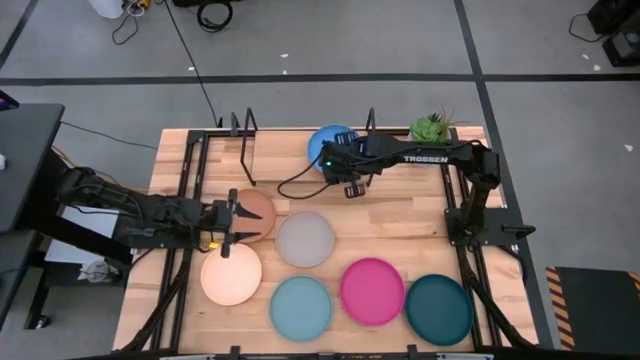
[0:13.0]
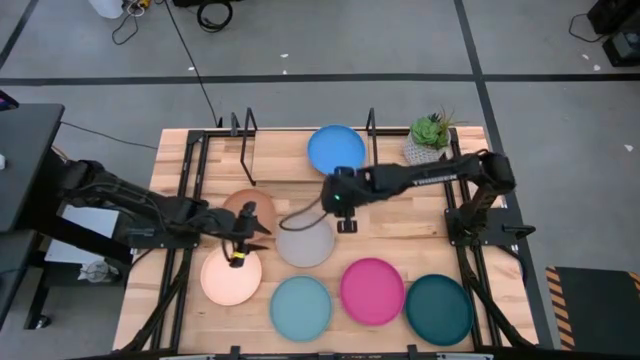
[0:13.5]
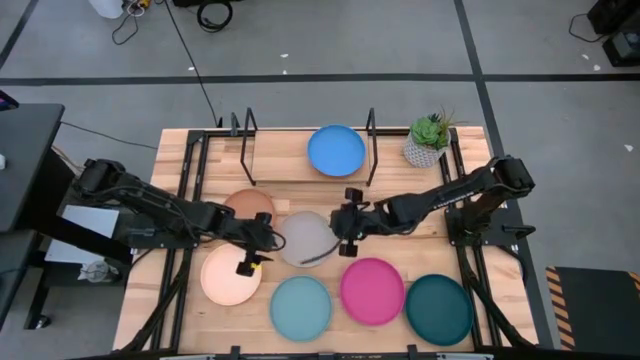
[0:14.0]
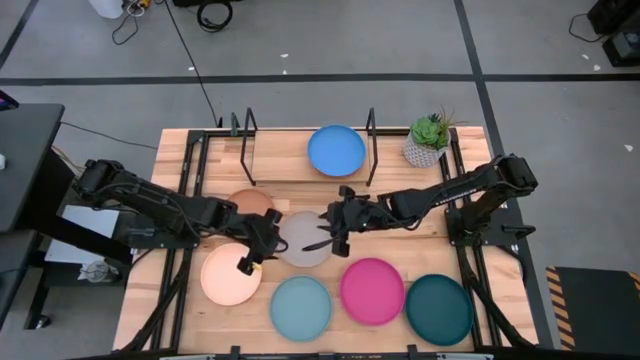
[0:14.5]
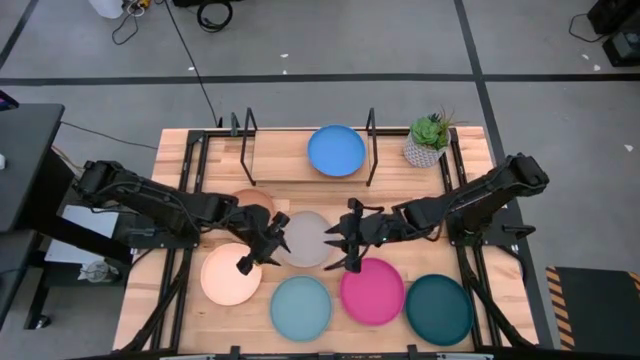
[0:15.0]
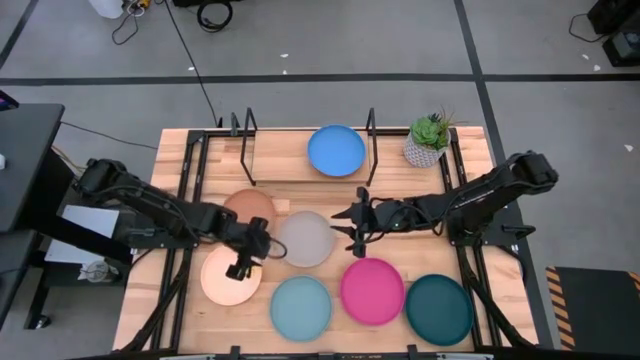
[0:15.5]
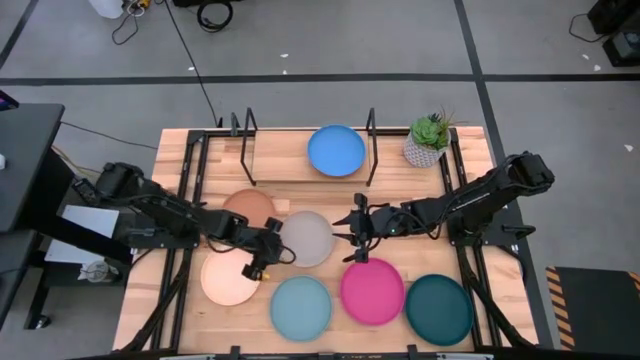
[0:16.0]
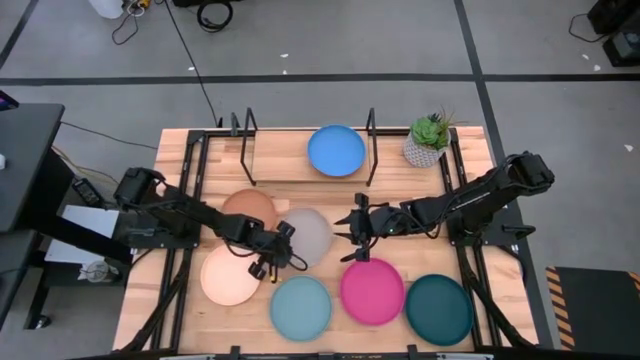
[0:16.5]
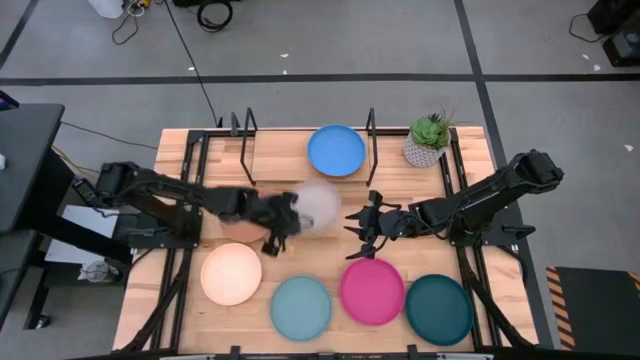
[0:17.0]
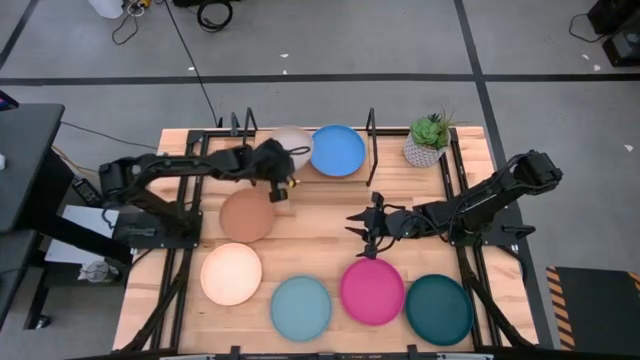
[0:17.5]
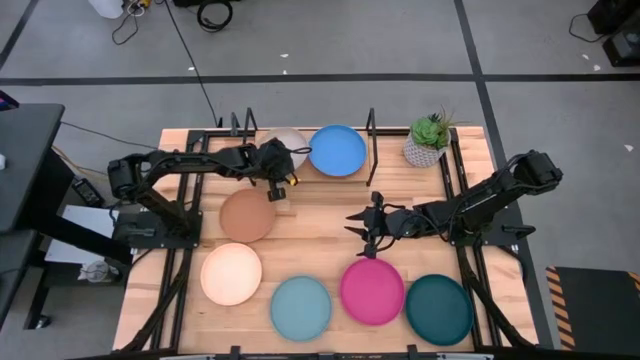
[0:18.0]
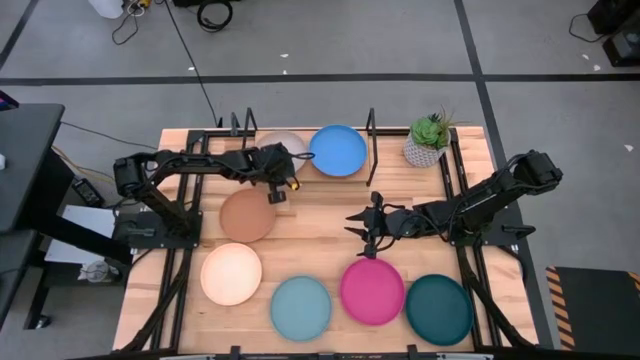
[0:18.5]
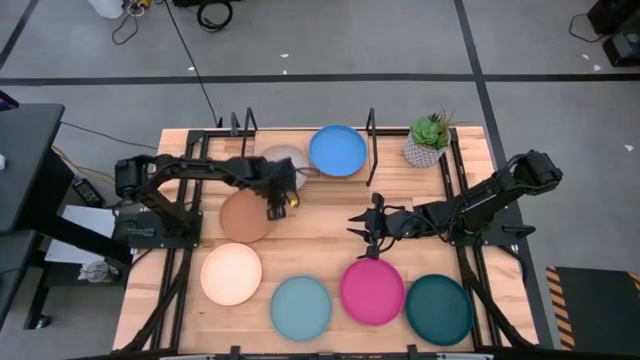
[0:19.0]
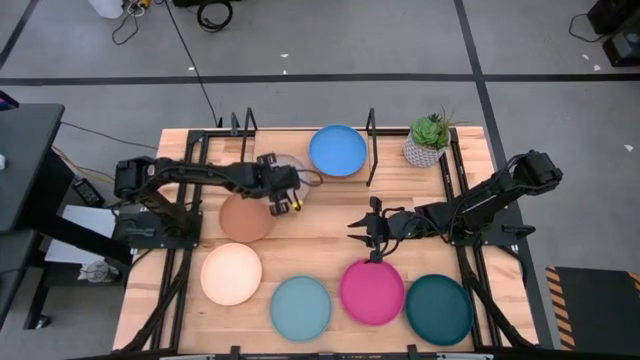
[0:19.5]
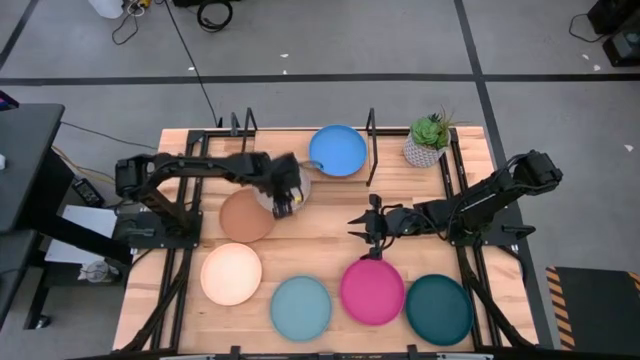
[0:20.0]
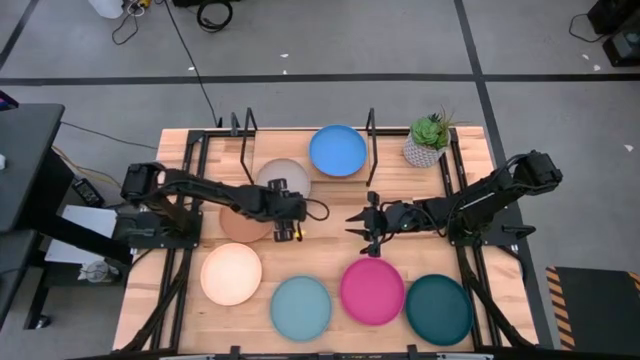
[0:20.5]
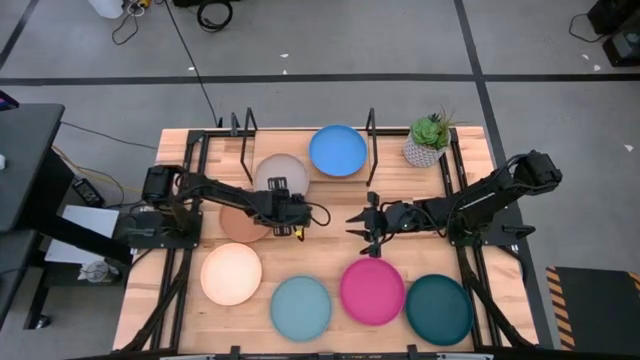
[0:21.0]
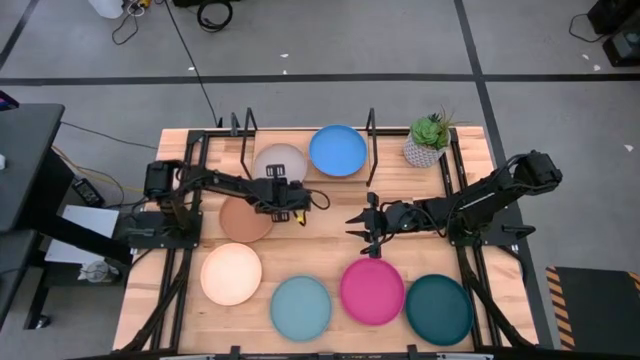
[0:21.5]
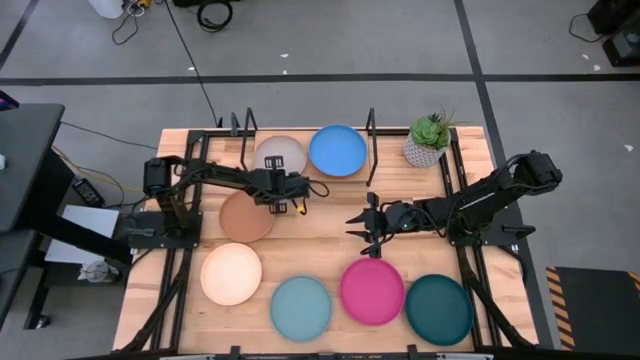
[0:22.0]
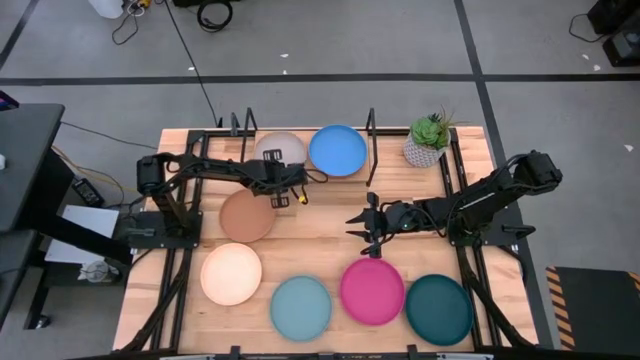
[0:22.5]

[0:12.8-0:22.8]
Task: Place and stack plates onto a shelf
Put the gray plate on the shelf

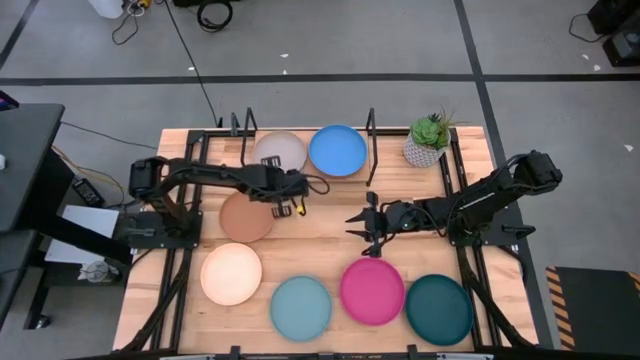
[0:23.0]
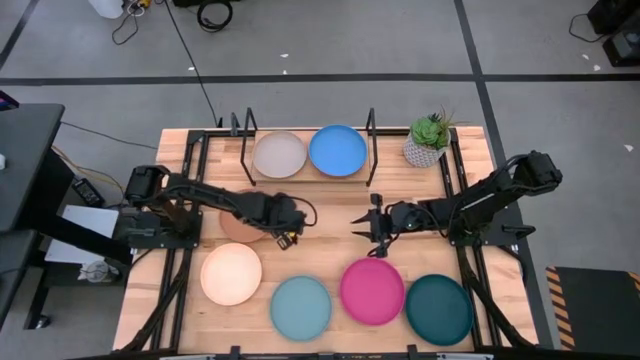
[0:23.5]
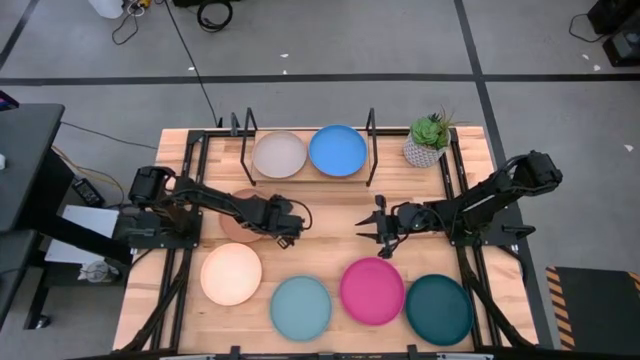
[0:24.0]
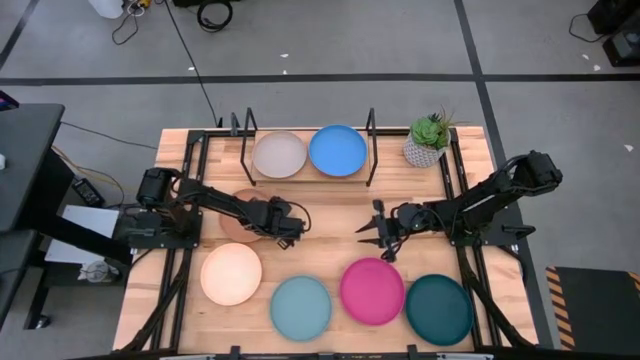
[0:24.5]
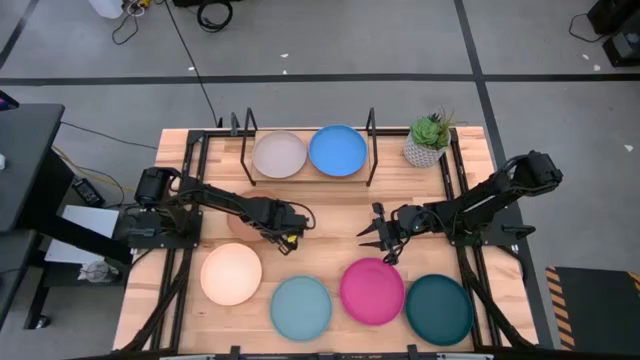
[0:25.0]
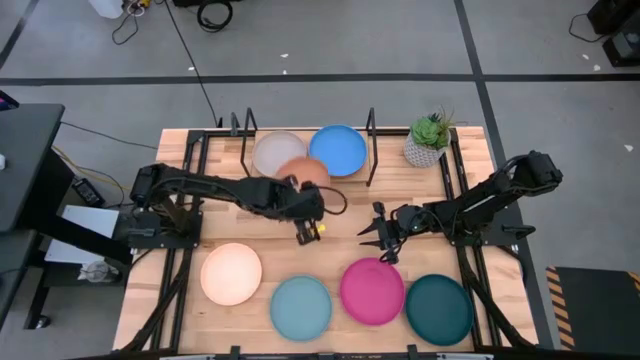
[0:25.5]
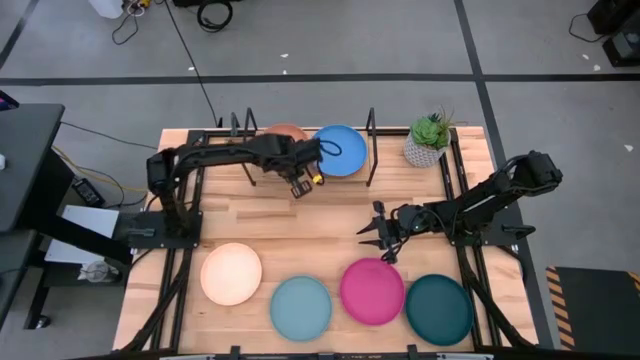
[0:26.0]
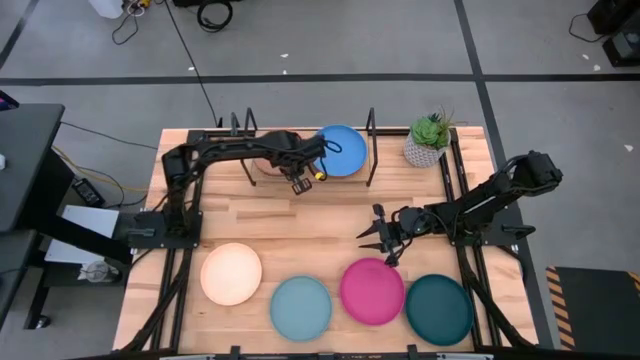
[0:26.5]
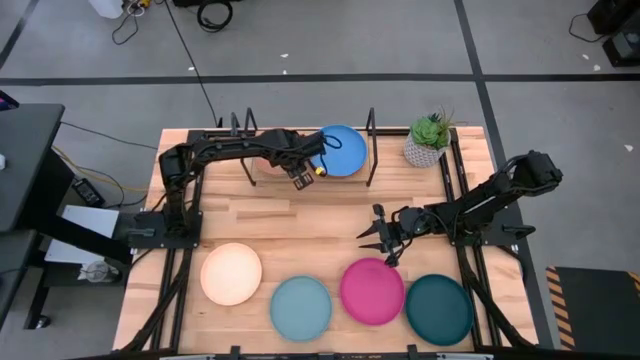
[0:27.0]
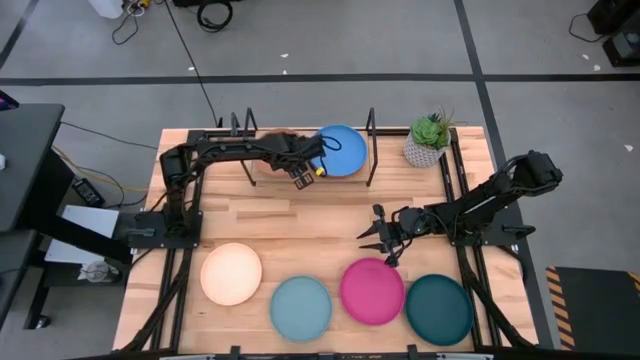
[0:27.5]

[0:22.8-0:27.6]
Stack the brown plate on top of the gray plate on the shelf

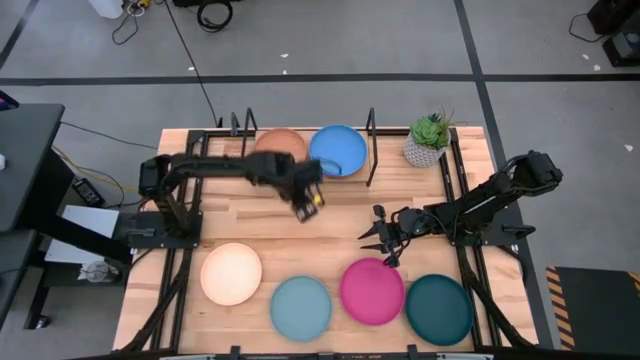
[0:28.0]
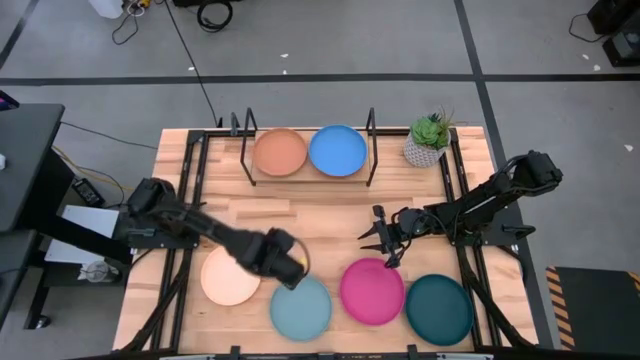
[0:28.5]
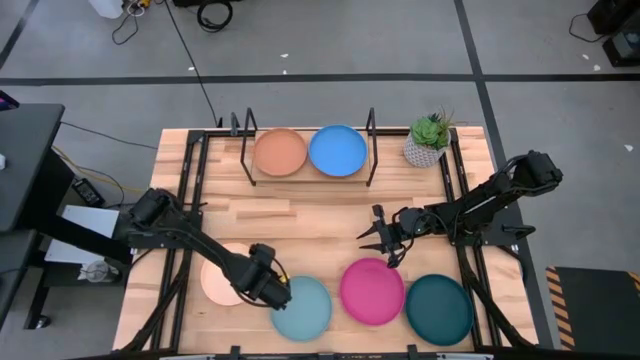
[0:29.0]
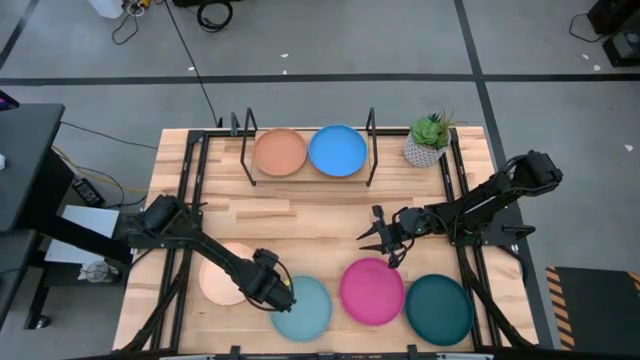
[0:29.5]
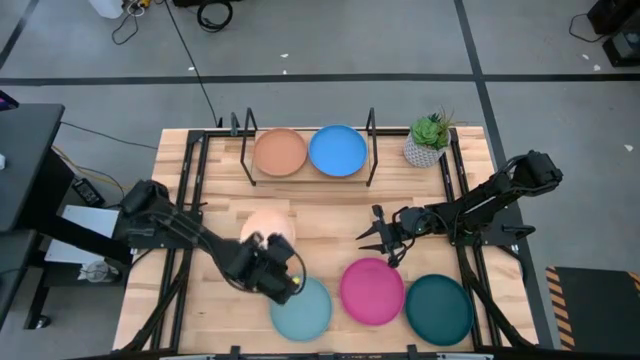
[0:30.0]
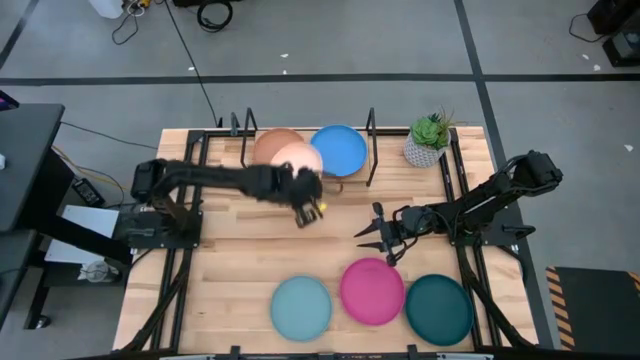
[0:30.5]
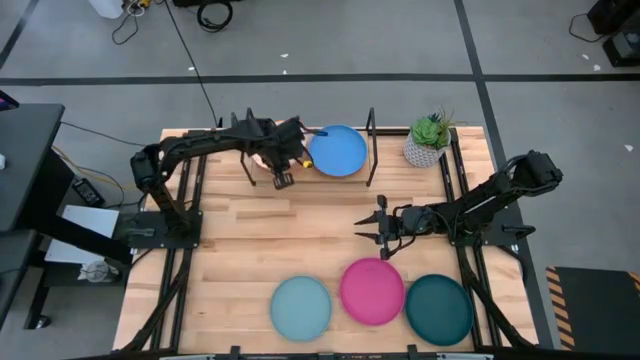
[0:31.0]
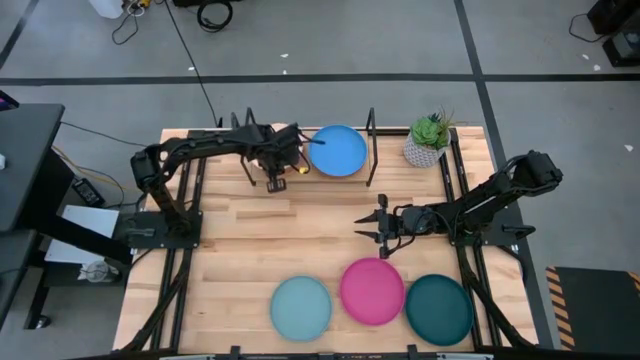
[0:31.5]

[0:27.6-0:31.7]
Stack the white plate on top of the brown plate on the shelf

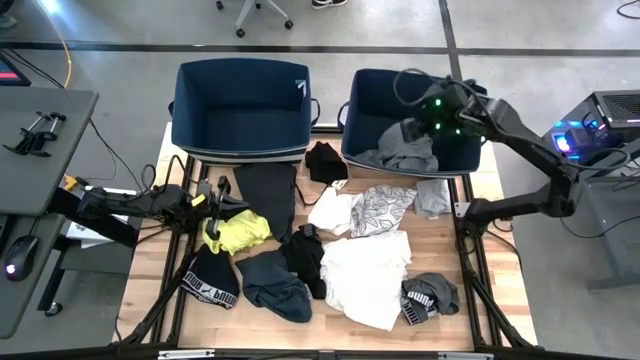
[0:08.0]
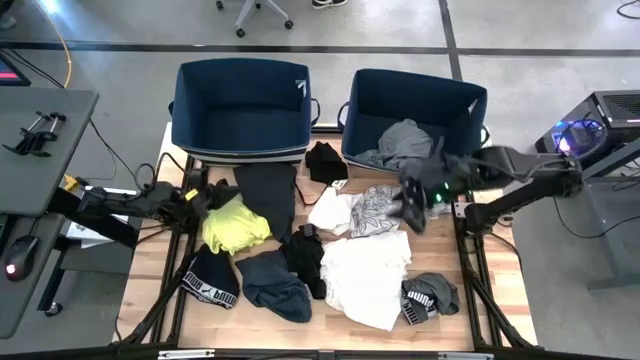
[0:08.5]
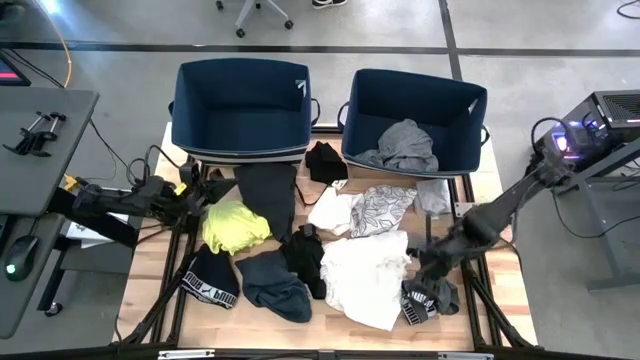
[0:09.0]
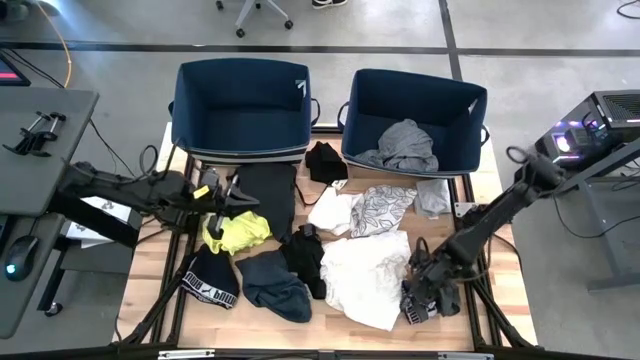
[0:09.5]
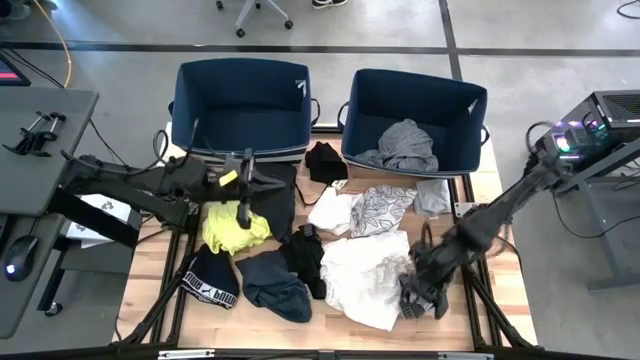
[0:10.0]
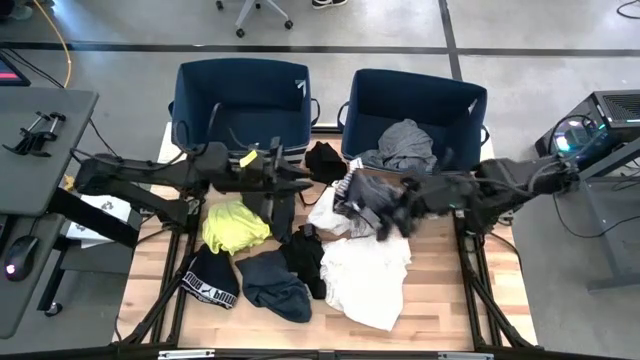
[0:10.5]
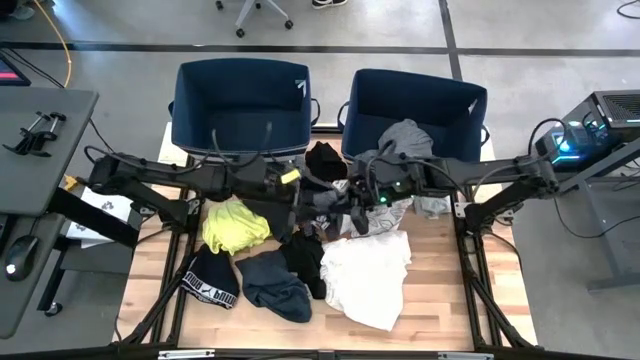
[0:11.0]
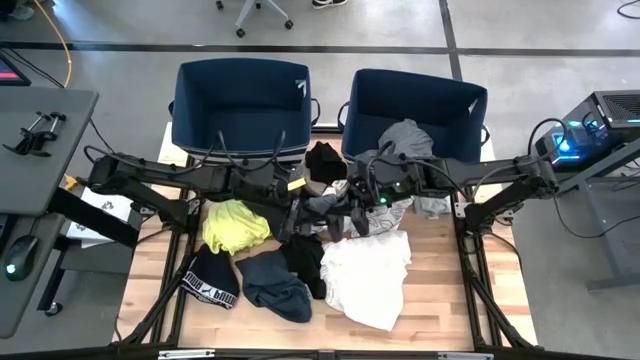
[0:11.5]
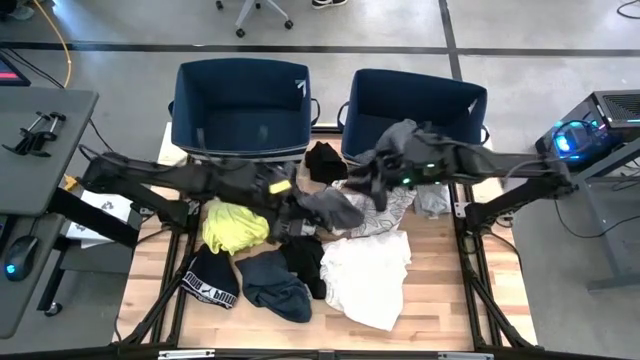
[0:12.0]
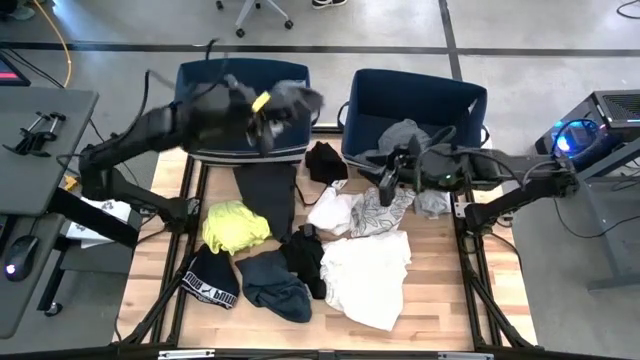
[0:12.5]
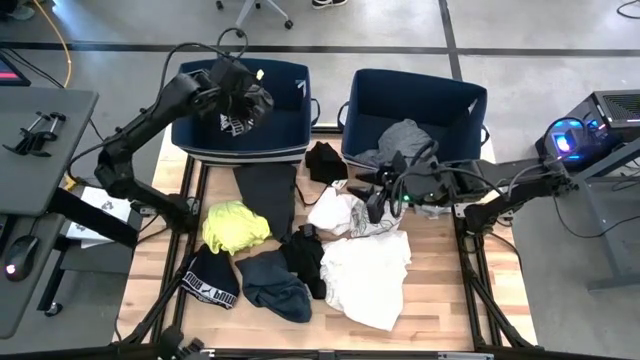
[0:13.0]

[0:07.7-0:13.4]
Task: Sort clothes
Put the gray underwear into the left laundry bin
